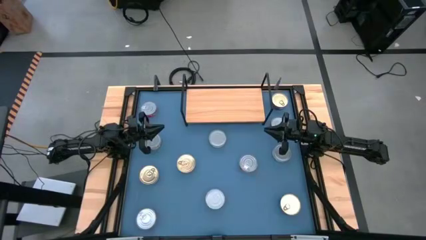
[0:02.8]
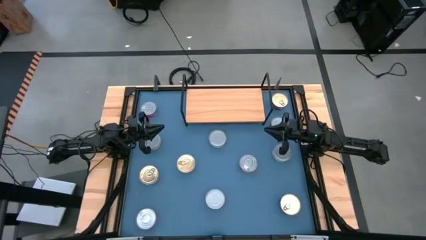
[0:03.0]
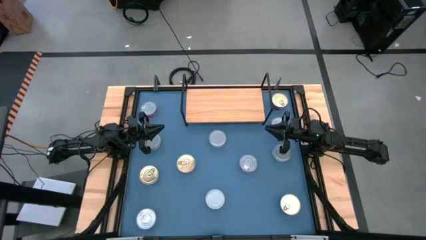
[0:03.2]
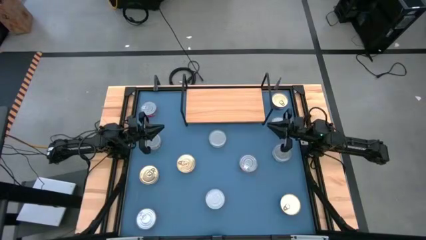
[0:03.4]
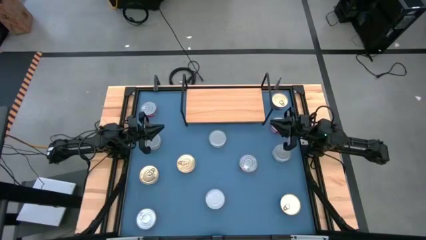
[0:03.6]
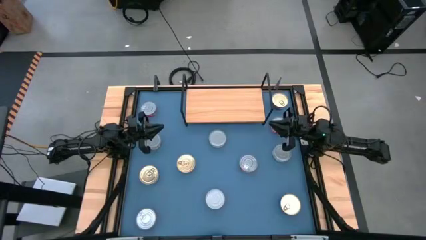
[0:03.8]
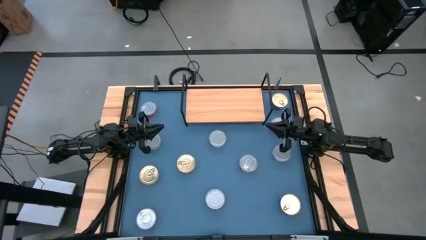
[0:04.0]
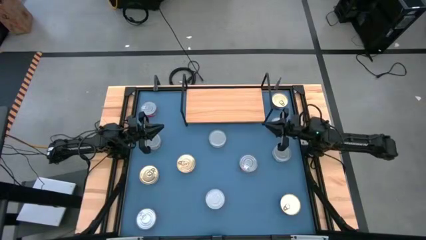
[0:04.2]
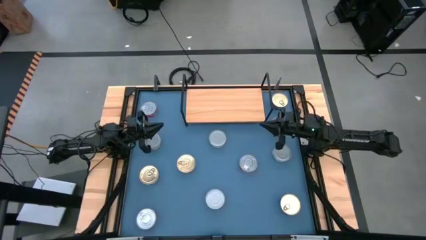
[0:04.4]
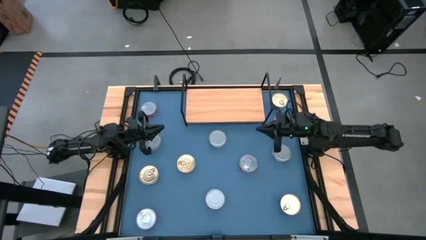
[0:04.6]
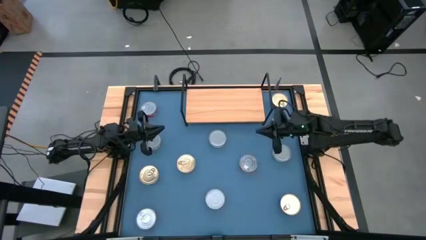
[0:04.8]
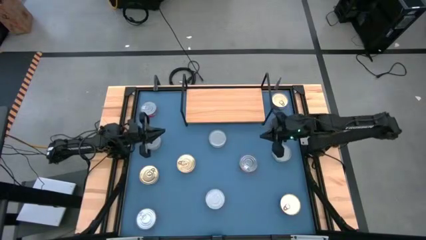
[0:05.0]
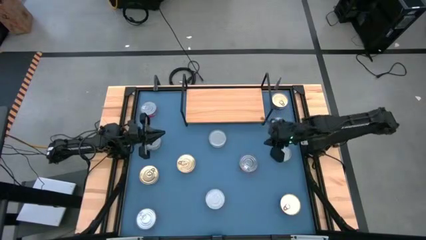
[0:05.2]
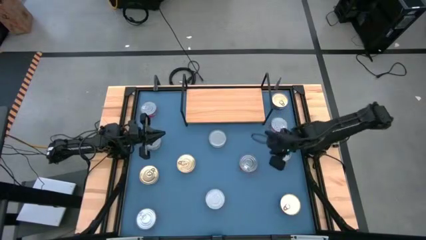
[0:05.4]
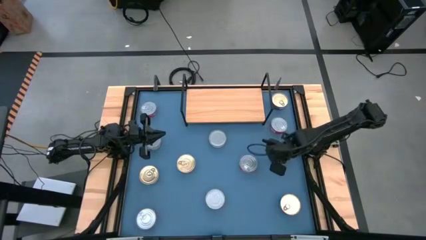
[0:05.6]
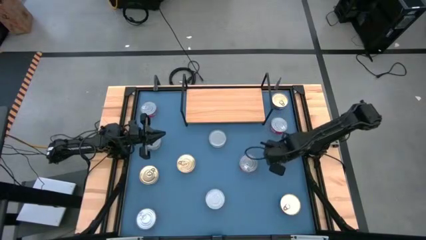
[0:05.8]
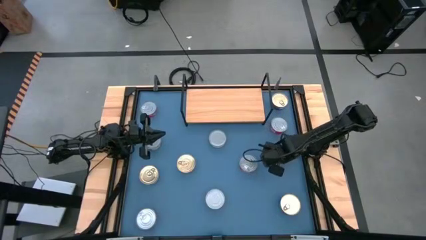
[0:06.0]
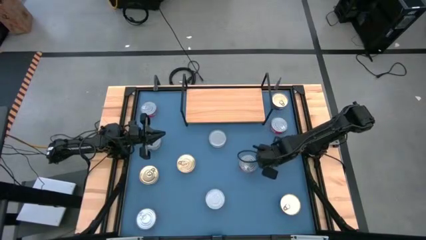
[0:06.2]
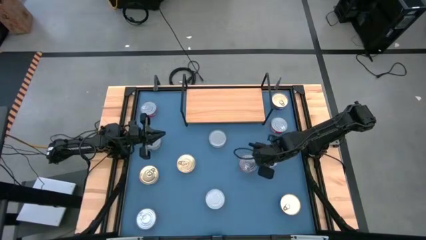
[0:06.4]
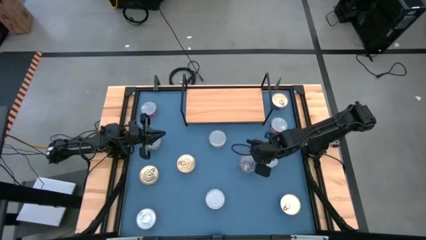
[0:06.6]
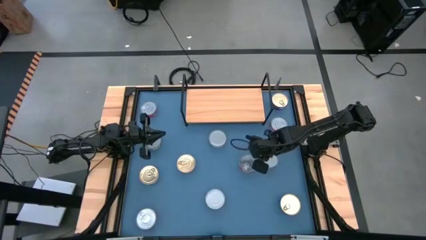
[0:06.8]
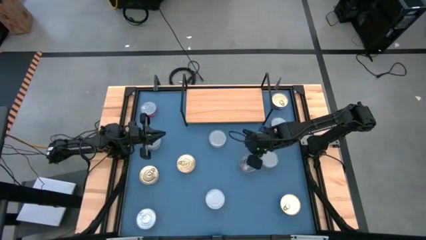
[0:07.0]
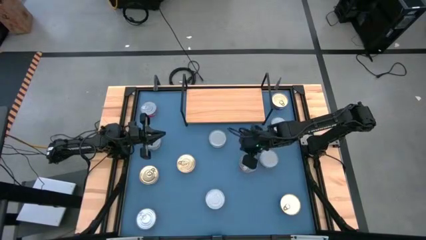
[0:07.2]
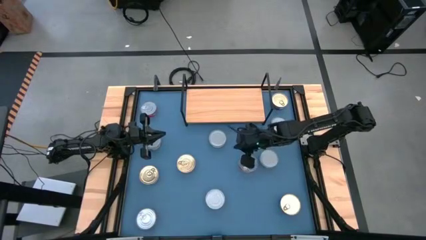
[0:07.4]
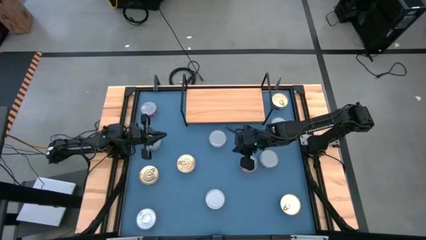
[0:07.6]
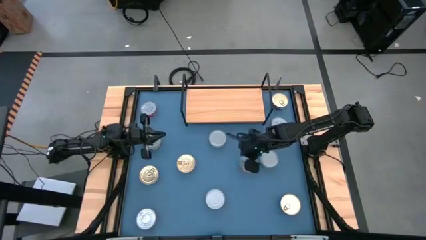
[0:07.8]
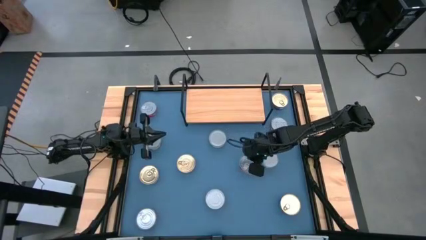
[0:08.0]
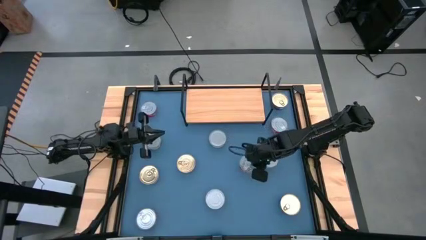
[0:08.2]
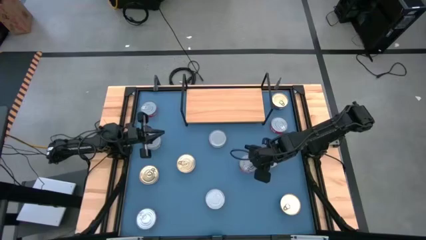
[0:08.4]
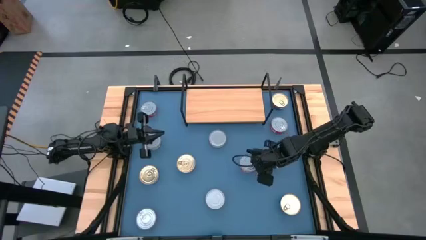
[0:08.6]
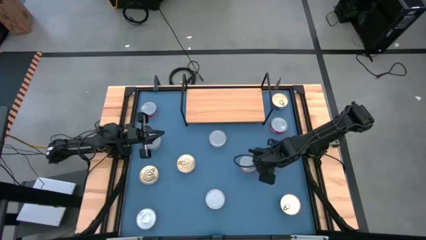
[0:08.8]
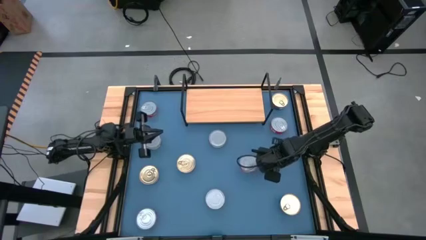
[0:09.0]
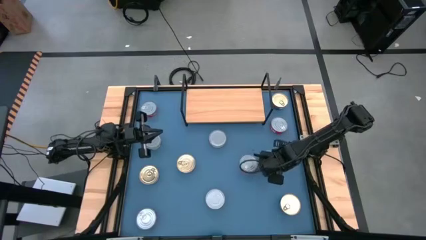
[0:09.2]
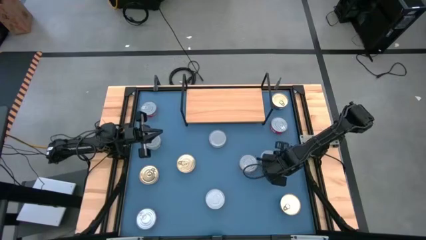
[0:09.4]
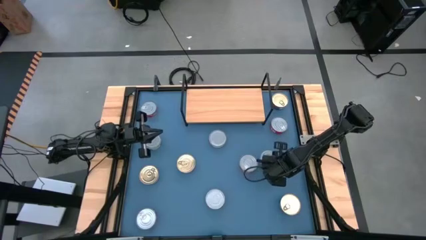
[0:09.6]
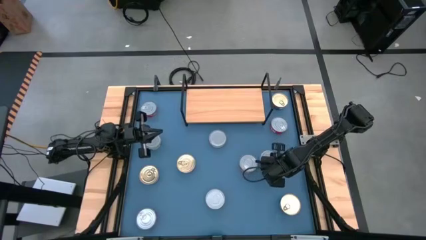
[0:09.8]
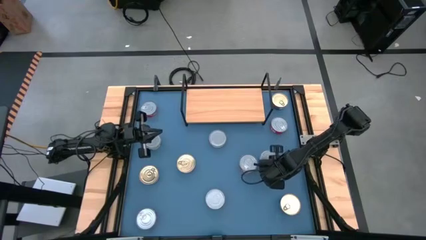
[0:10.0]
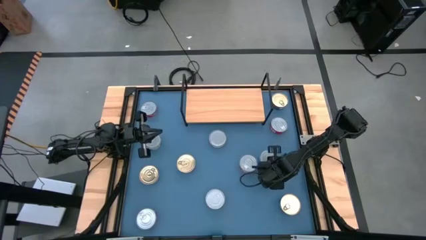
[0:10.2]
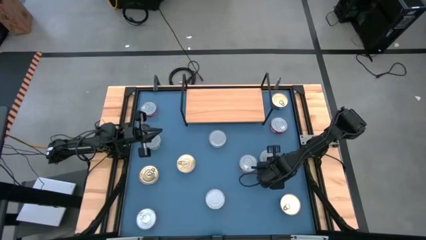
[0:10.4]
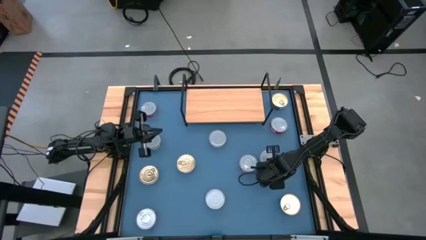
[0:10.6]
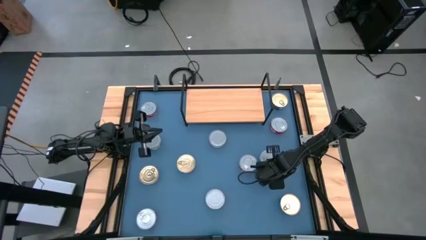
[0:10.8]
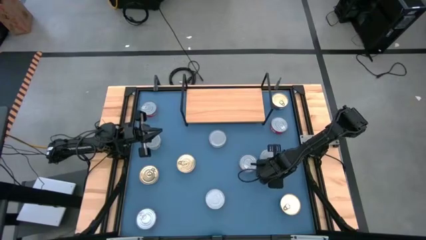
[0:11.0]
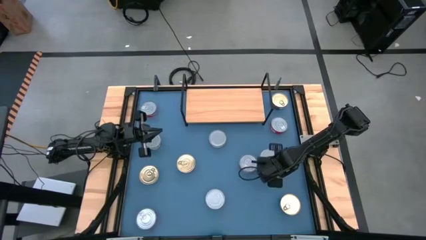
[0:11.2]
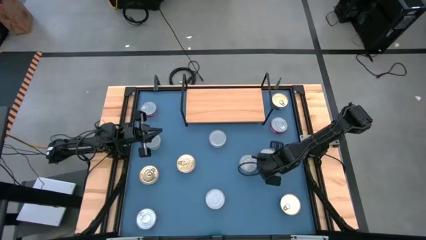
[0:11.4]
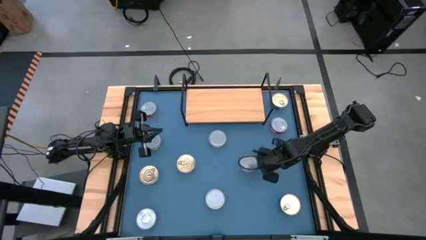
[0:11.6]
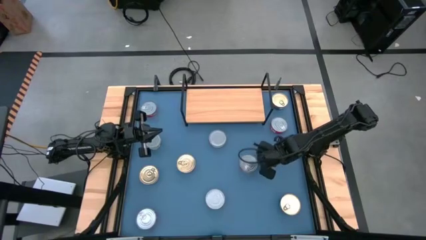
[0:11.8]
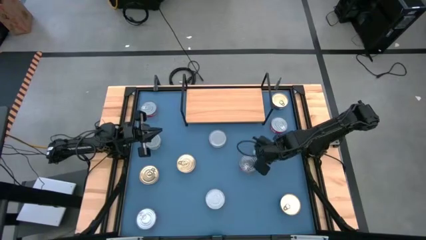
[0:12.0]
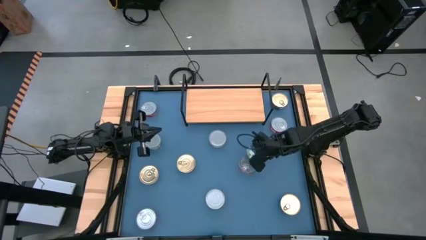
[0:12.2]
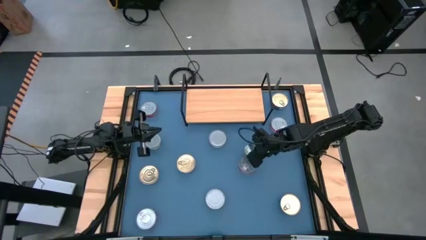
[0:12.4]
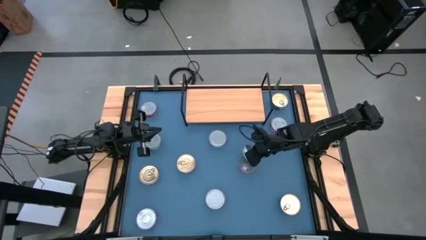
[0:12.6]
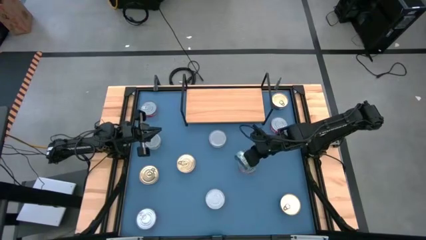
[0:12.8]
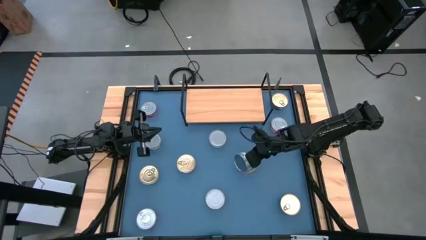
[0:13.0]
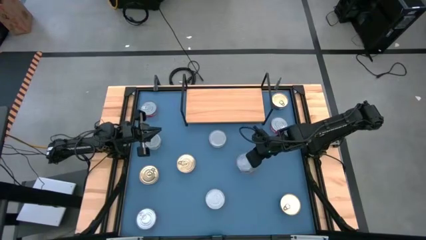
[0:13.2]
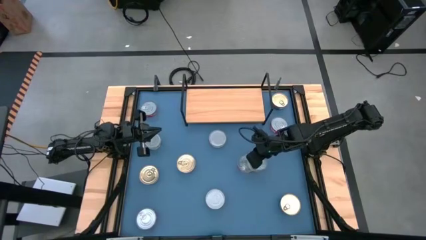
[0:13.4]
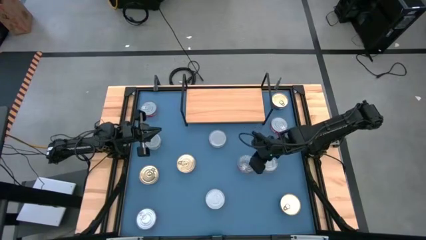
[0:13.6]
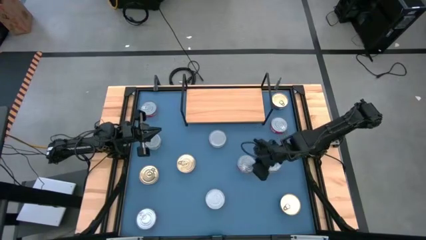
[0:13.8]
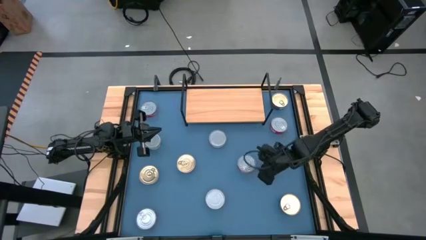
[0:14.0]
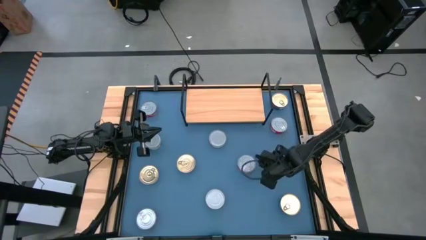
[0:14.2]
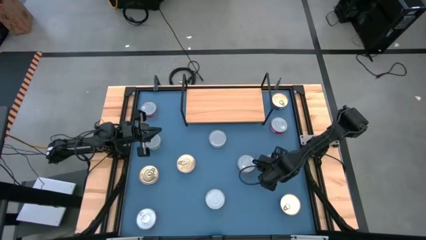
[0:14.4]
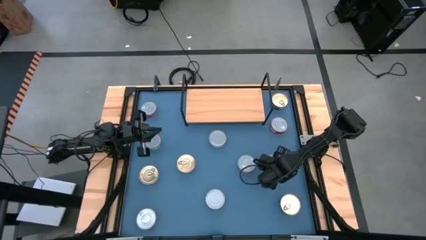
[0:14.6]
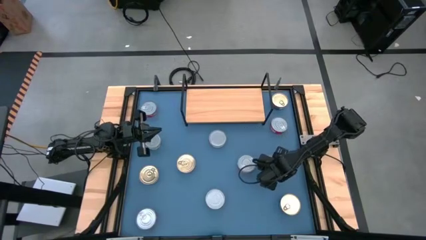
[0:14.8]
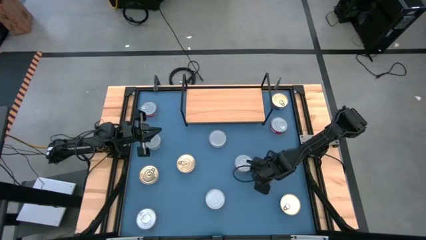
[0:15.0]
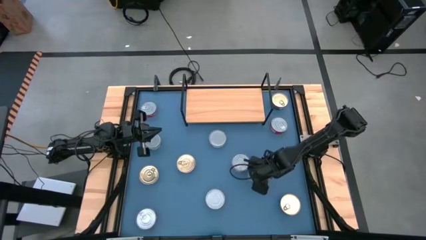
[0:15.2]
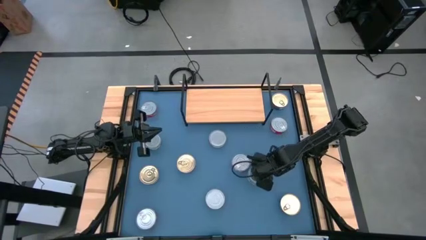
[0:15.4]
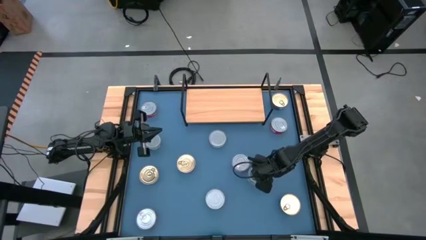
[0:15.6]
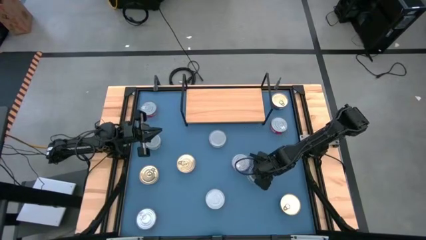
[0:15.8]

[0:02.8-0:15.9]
Task: Stack canned seafood by type on shelf
Put the green tuna can on the shelf

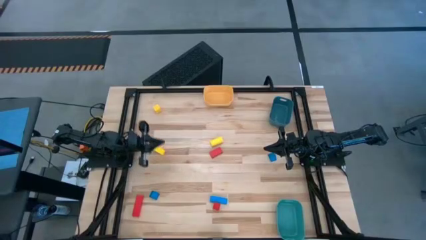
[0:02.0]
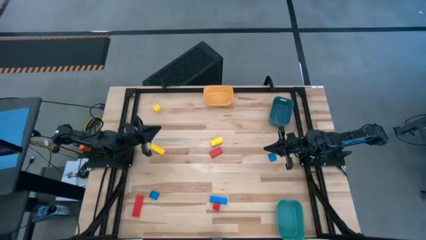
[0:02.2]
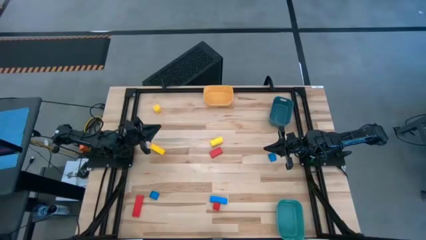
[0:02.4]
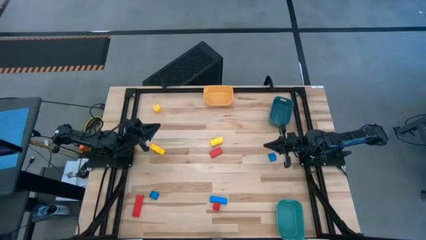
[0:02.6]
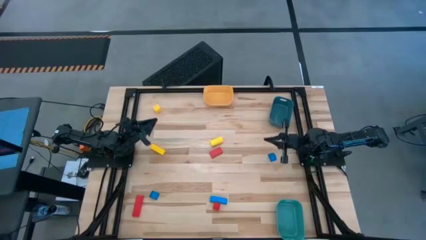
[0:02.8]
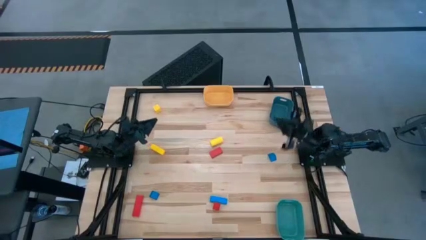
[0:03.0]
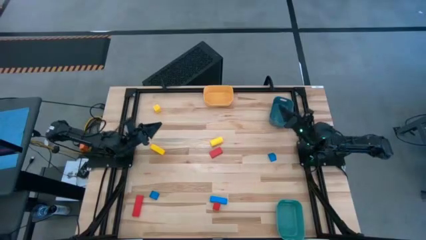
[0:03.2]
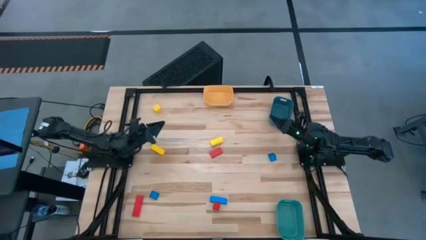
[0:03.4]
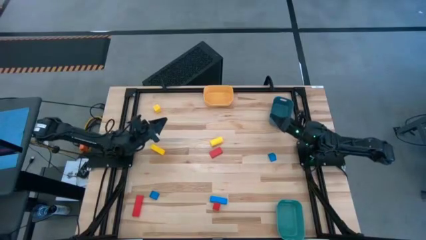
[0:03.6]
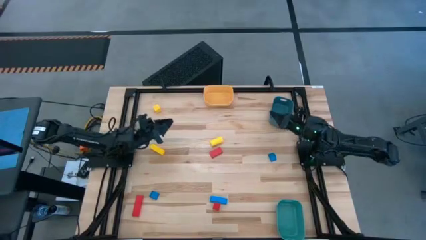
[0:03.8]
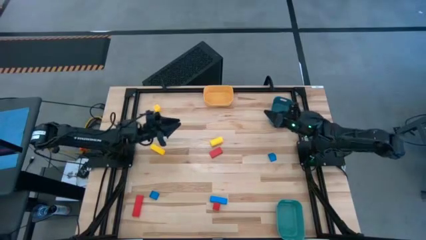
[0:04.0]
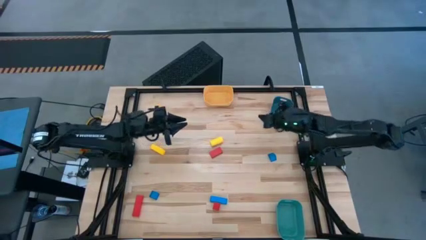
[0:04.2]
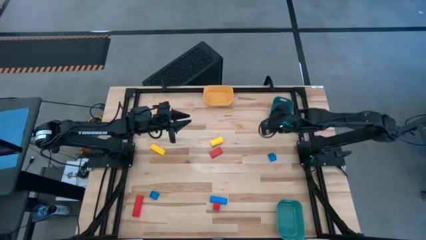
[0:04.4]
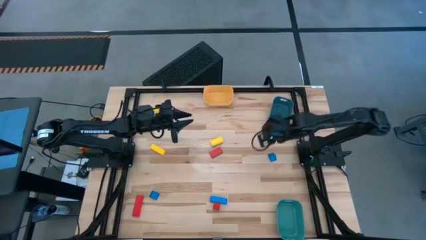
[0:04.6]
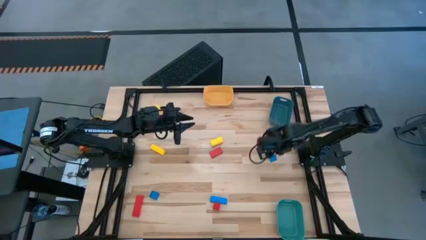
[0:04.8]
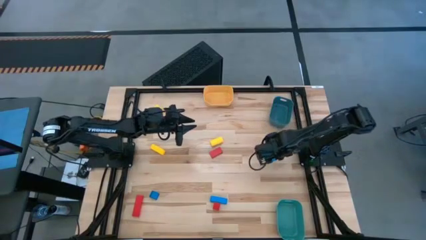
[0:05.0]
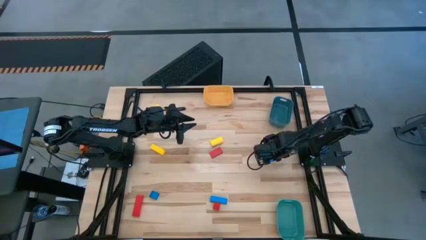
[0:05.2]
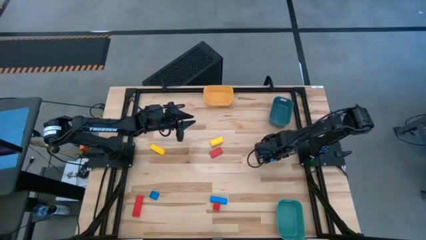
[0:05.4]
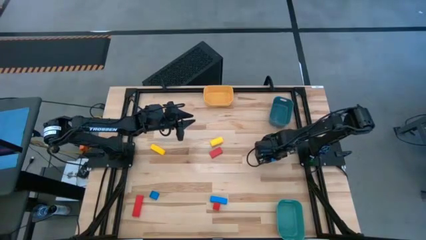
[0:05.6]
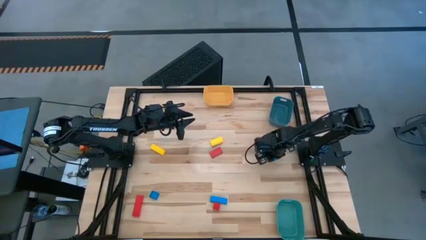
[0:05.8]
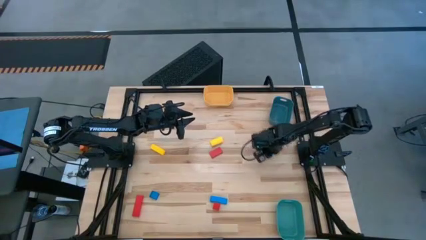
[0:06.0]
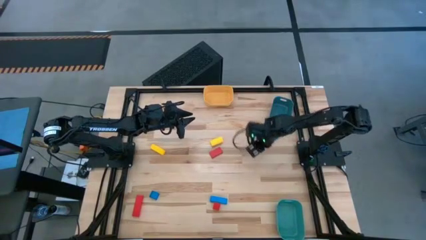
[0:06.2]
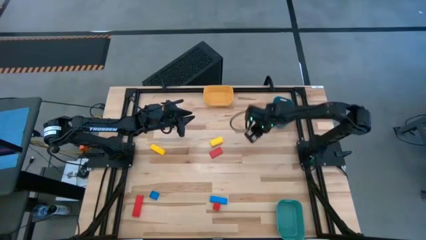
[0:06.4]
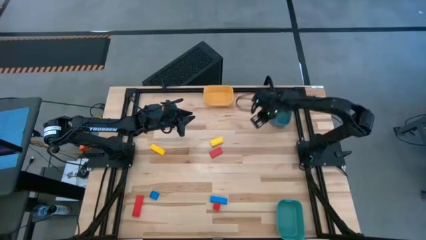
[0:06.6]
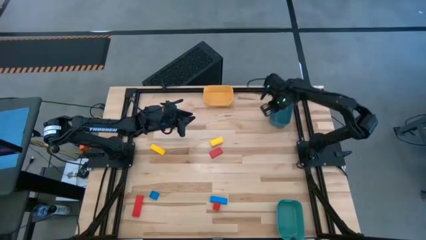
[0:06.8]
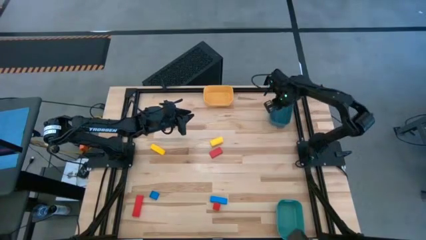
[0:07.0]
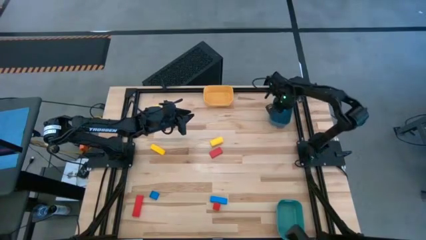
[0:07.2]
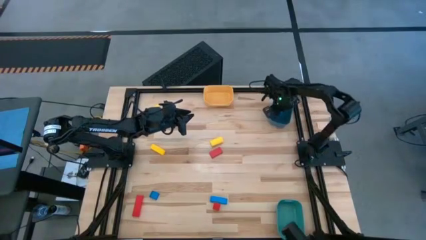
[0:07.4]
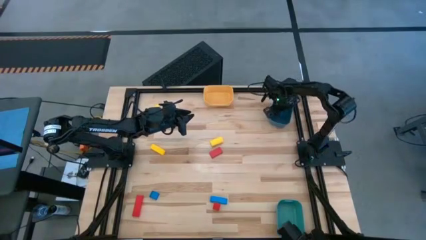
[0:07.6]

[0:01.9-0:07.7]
Task: Sort & place blocks by color
Put the top right blue block into the blue bin
